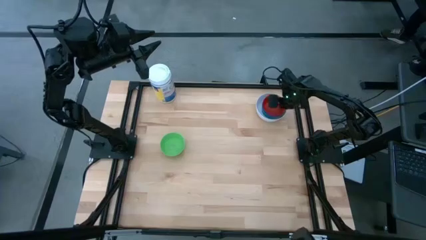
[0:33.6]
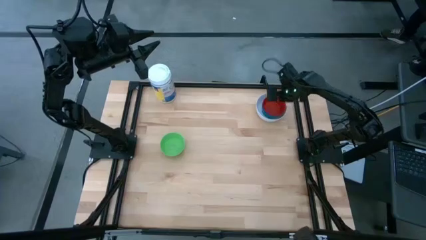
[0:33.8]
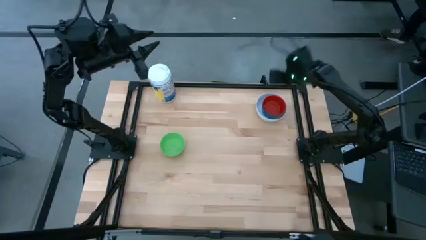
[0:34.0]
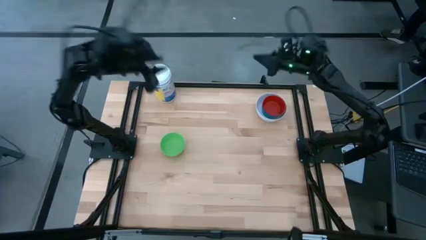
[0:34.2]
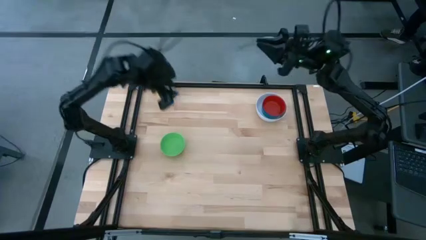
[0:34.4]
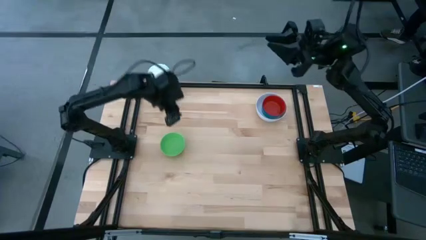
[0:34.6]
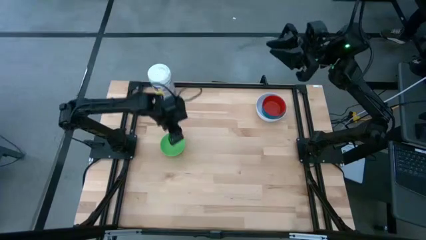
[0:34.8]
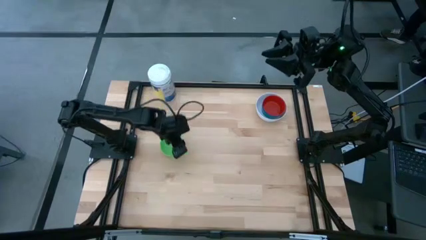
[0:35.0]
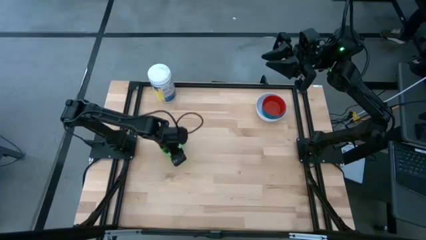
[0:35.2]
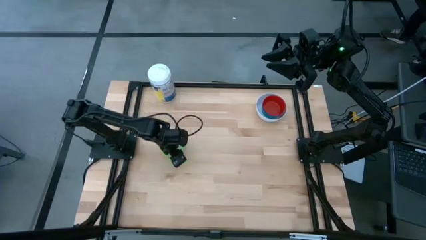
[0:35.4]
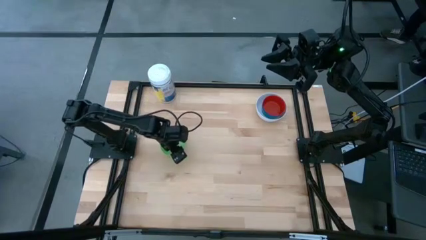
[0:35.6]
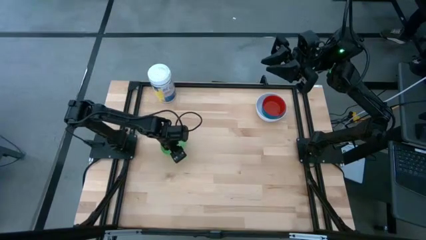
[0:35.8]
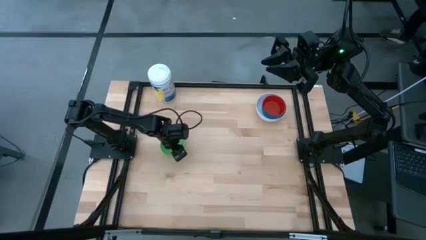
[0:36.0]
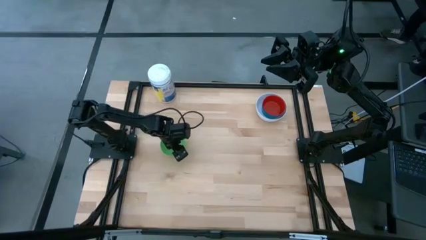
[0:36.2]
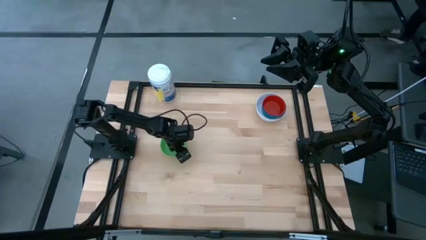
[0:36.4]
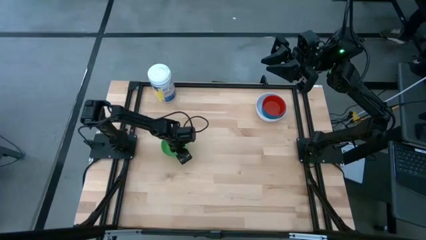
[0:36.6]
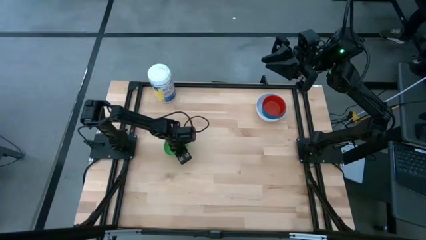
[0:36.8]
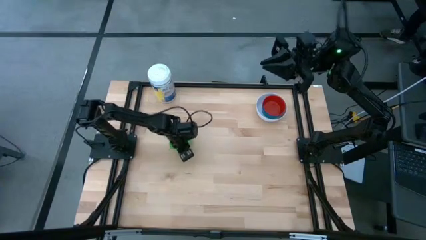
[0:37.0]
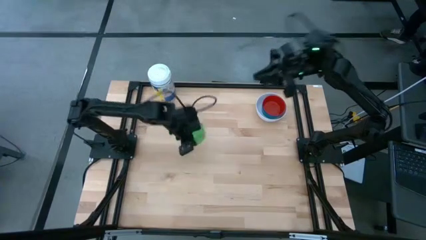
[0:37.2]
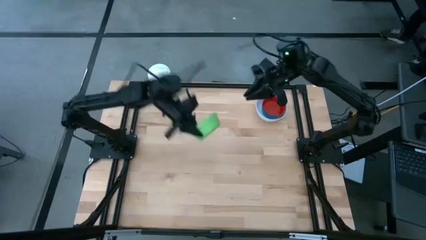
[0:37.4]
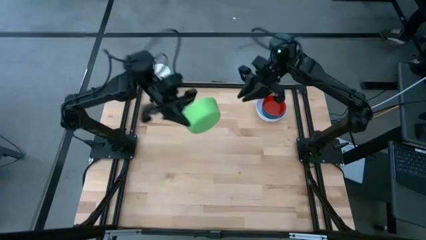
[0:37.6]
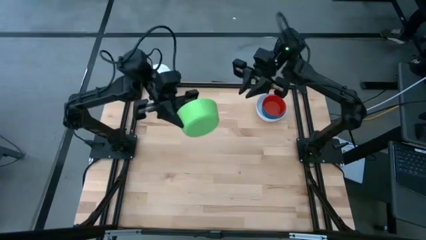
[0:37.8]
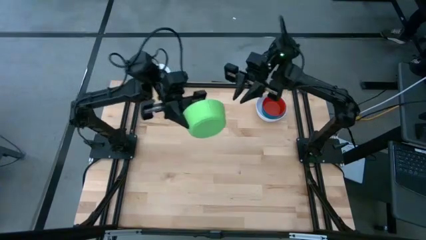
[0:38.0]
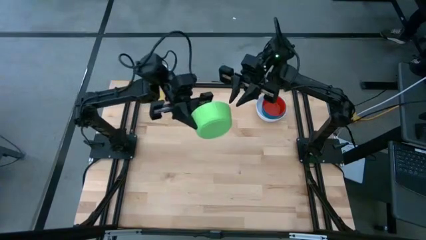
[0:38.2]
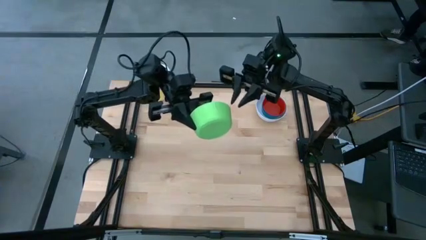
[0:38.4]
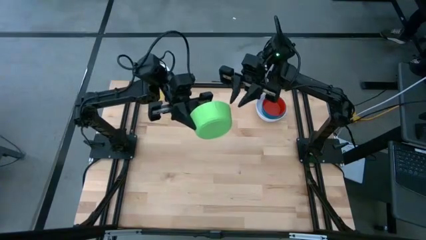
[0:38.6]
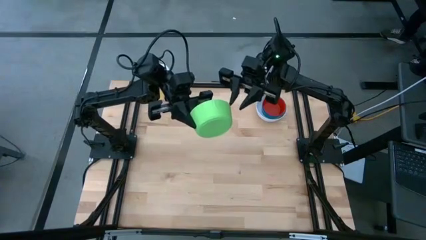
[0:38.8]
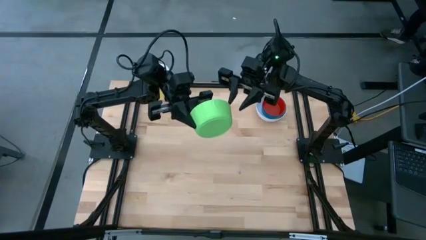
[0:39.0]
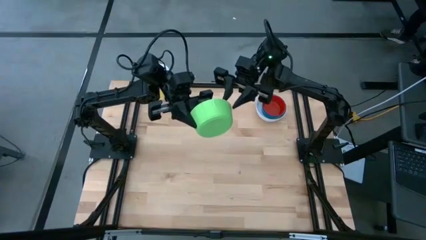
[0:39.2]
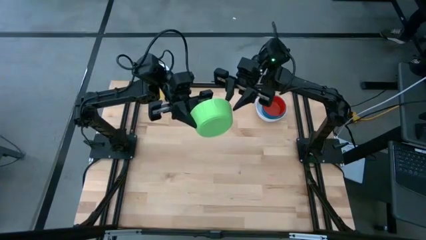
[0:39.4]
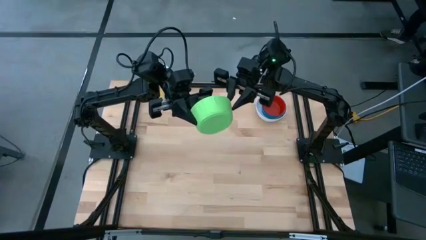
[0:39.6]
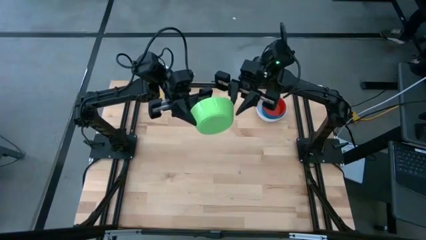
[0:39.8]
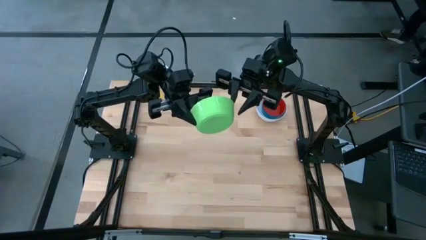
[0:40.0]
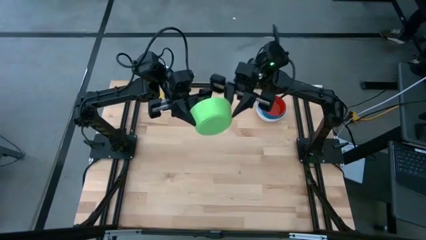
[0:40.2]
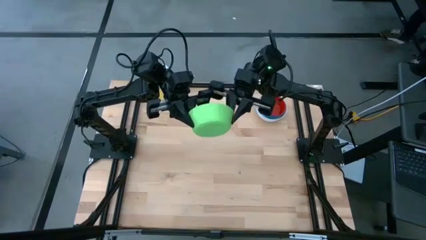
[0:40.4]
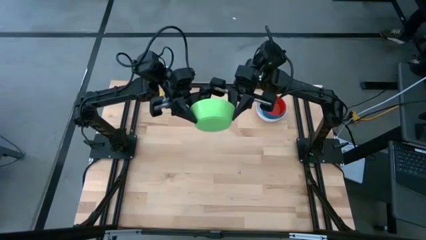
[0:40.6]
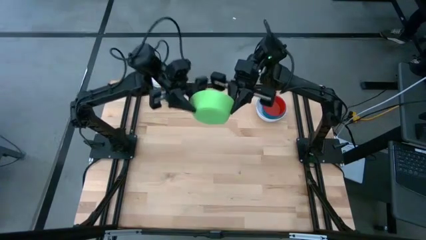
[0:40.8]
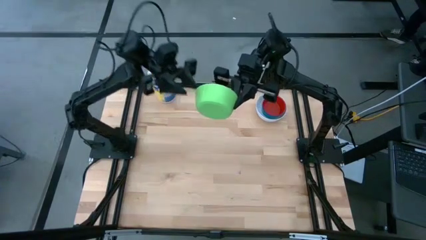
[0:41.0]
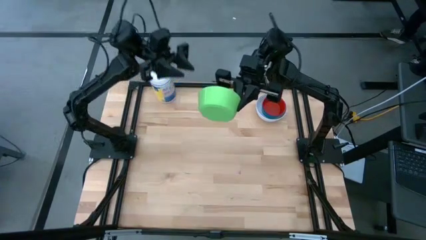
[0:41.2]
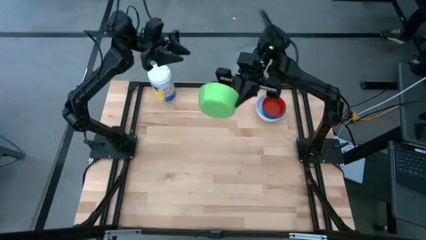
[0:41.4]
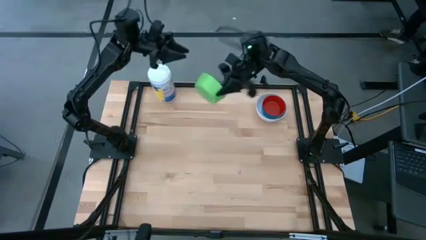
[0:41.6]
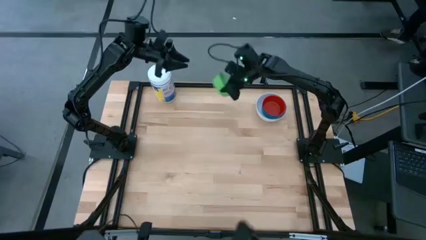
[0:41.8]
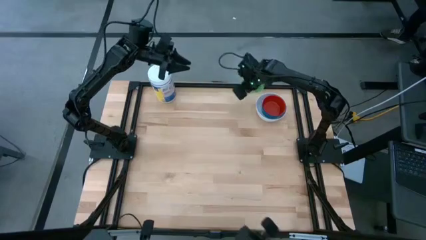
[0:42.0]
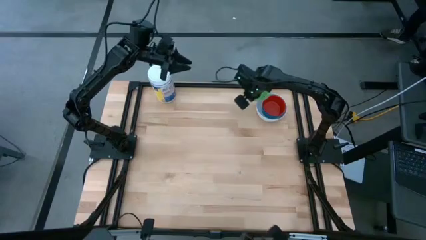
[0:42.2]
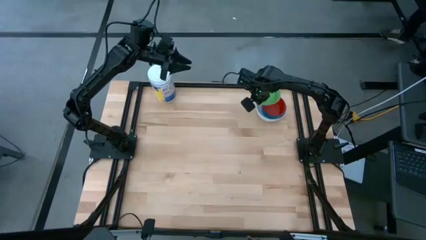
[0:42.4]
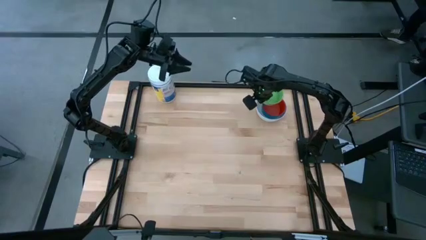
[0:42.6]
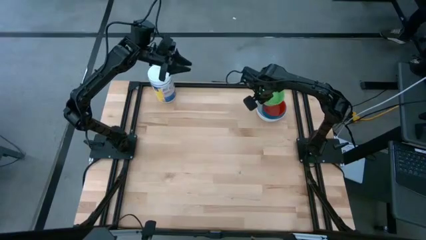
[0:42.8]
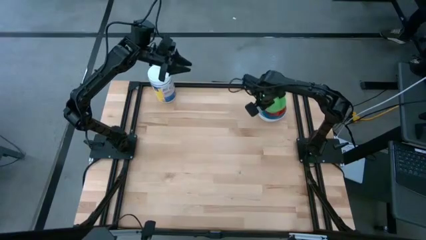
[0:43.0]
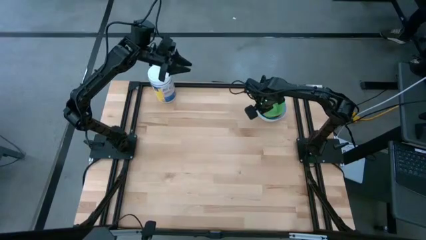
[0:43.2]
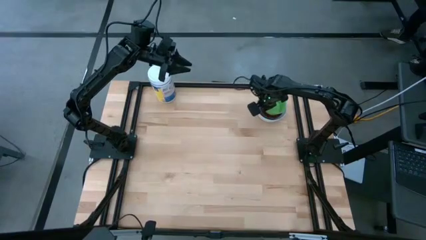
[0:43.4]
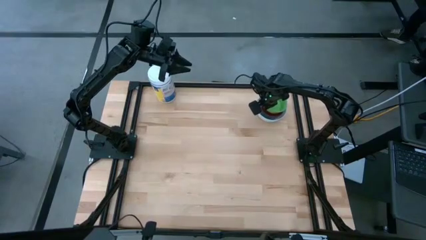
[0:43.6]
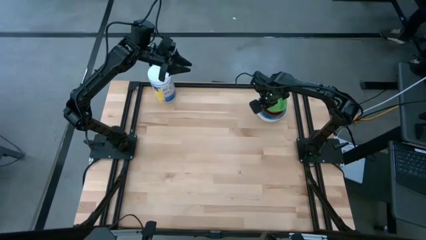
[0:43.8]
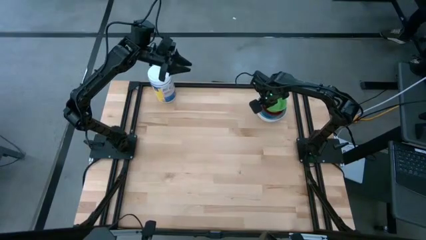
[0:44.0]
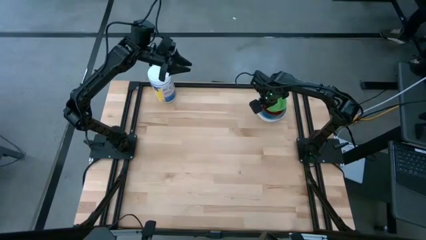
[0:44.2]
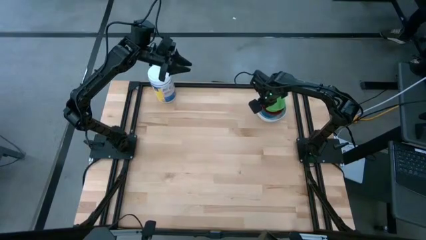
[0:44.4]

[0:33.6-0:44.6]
Stack the green bowl on the red bowl

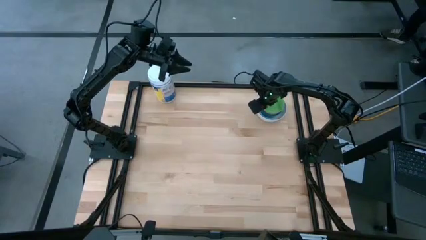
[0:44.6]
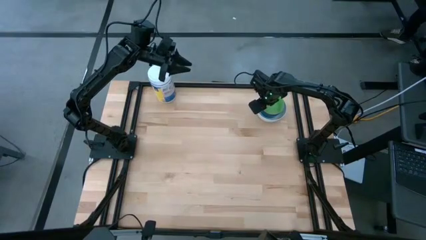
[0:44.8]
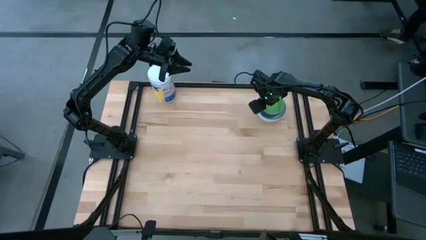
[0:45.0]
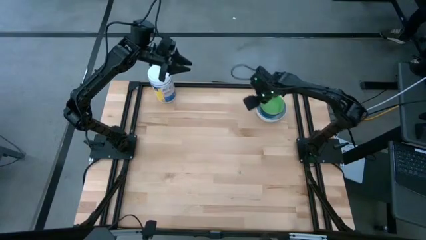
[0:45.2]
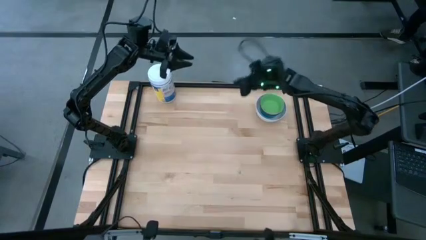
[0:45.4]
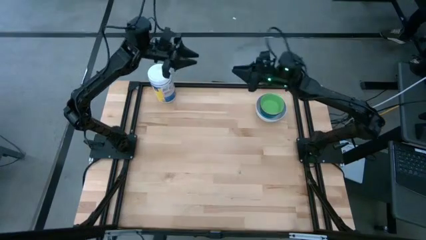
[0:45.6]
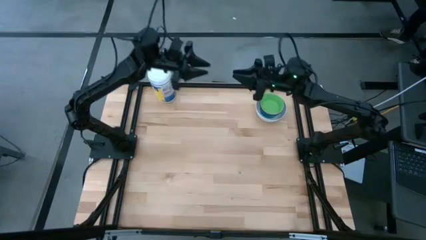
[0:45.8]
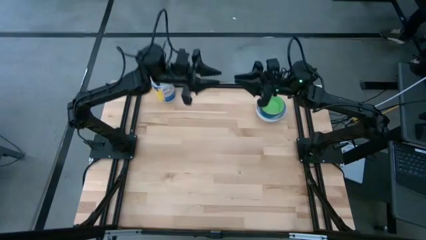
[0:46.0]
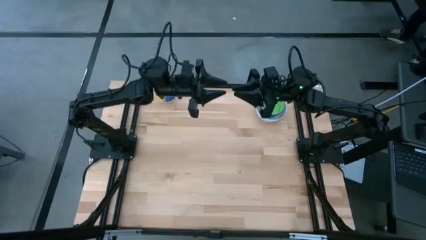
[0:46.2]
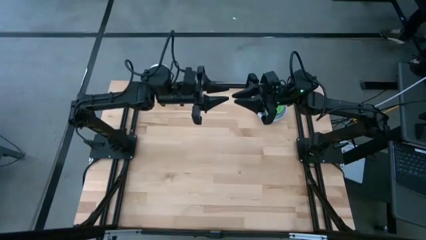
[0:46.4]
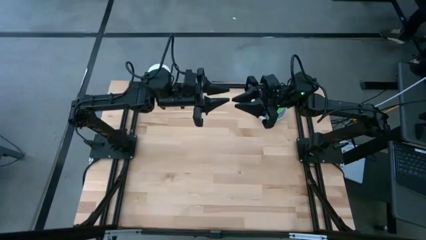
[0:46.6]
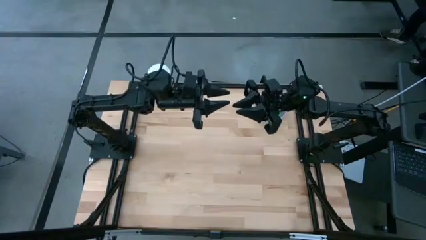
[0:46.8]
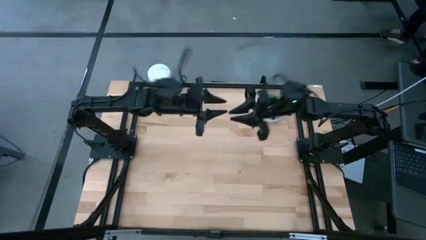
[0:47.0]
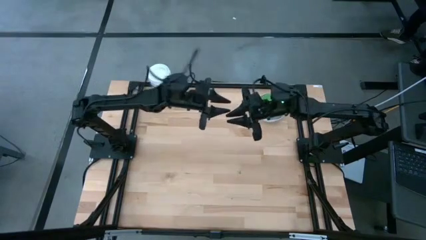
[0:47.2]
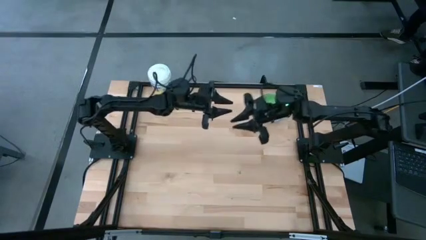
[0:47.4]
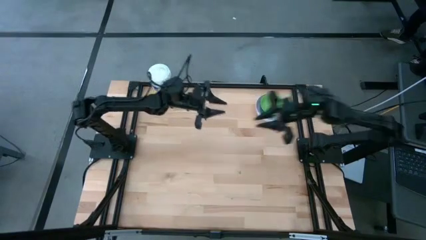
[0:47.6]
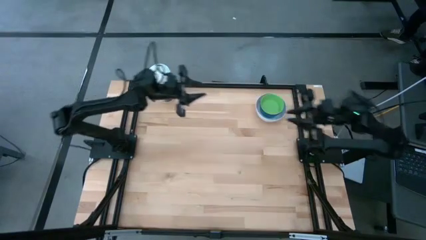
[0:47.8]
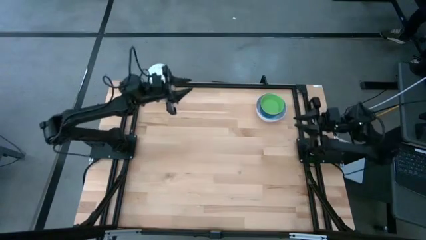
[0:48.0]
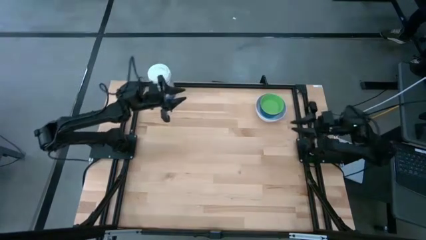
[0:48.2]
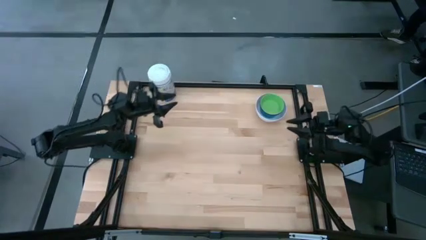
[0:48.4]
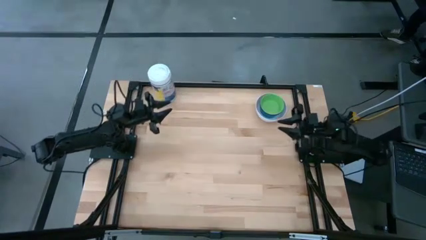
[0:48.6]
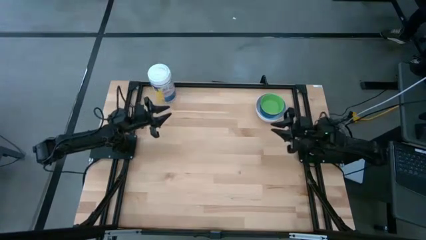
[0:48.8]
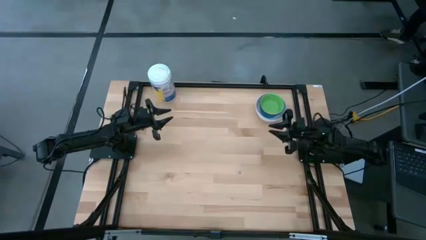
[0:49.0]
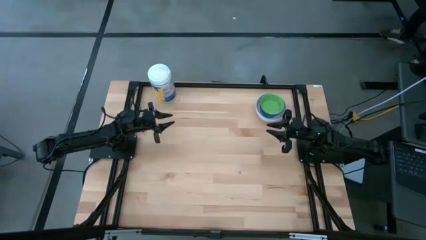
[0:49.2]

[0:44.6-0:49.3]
Return to Home Position
